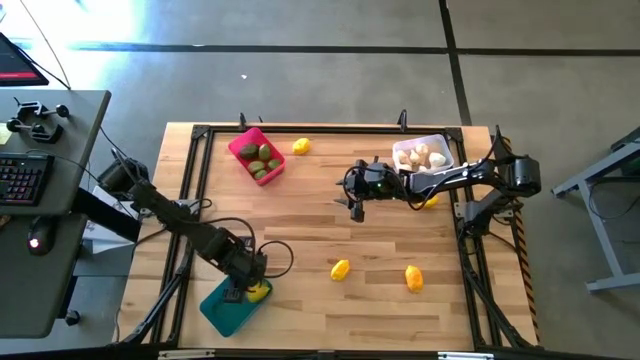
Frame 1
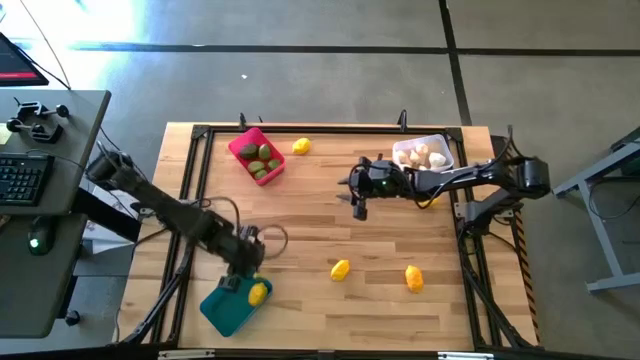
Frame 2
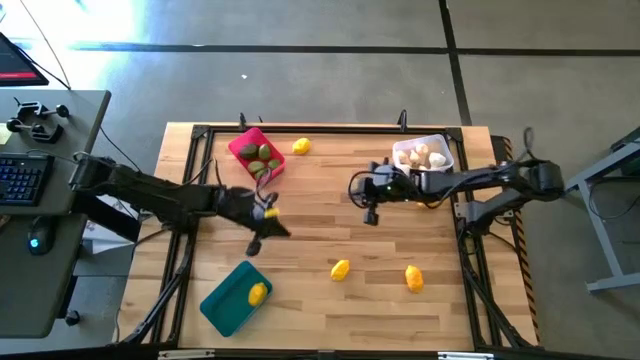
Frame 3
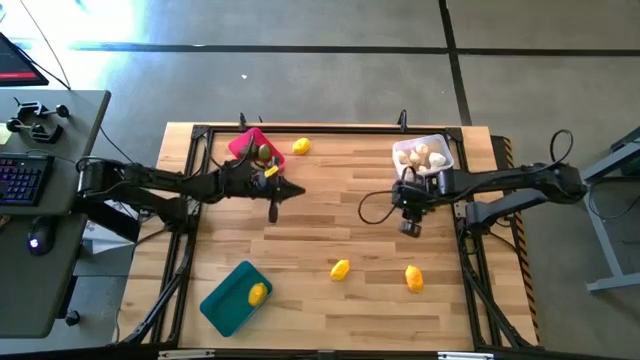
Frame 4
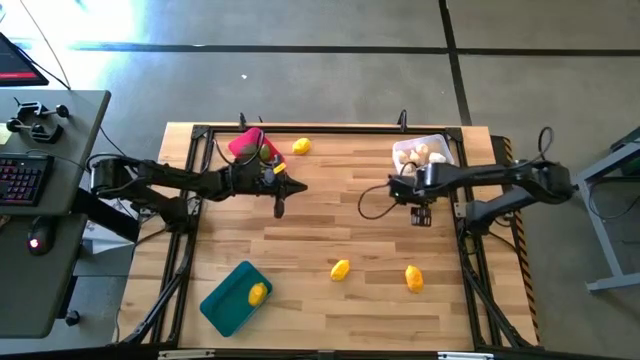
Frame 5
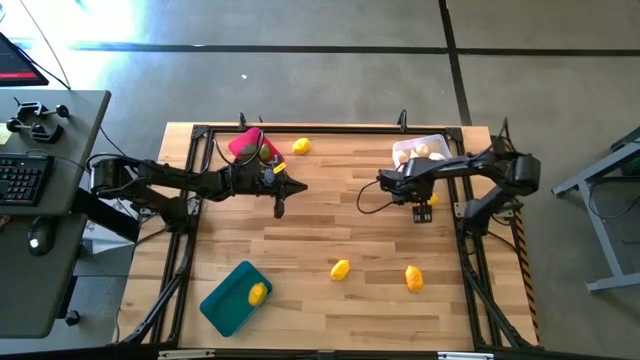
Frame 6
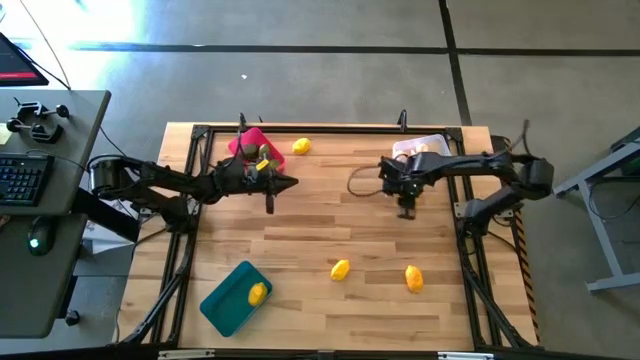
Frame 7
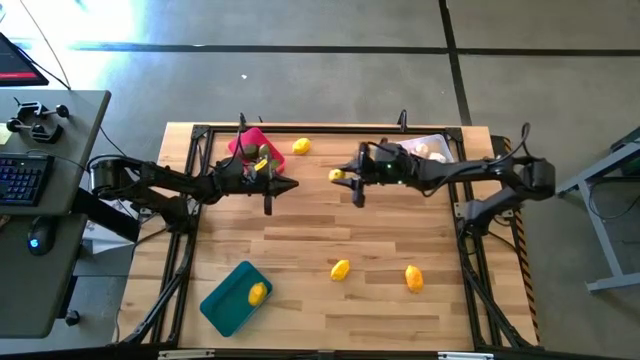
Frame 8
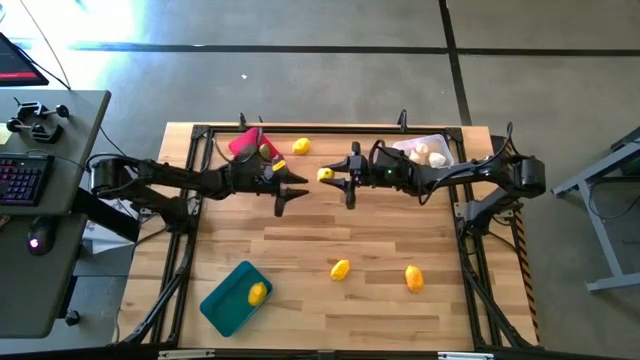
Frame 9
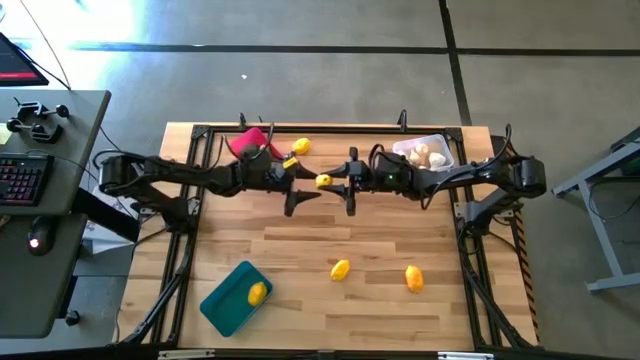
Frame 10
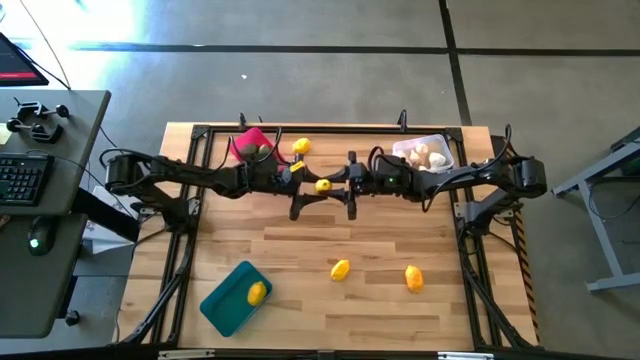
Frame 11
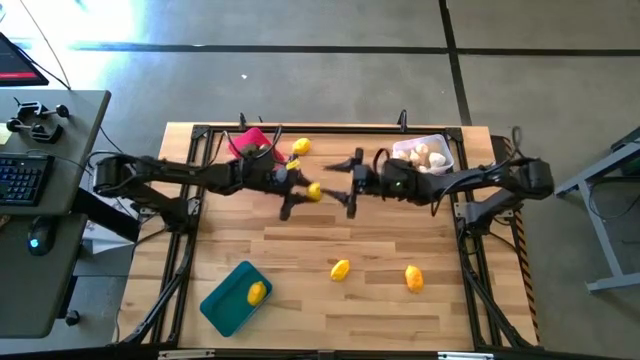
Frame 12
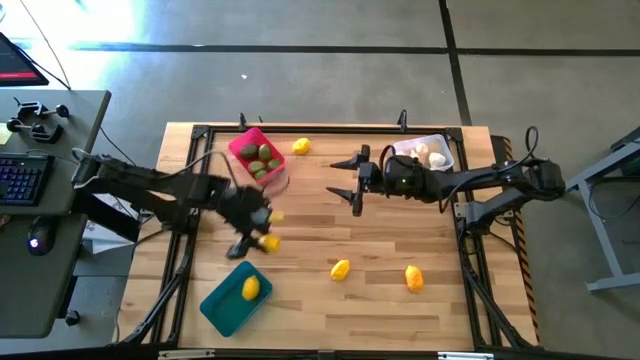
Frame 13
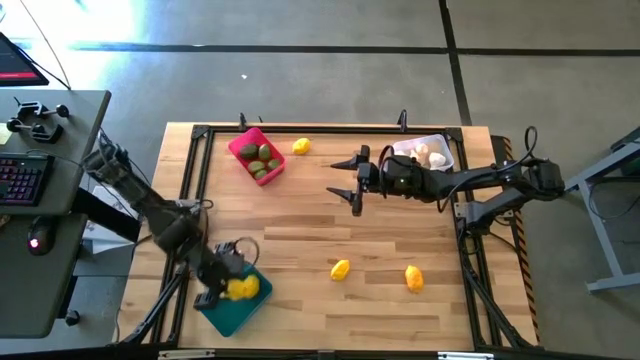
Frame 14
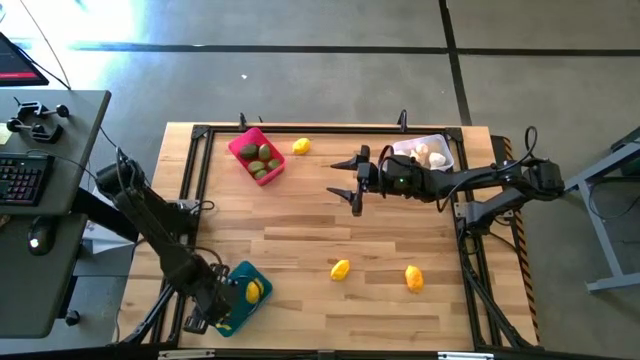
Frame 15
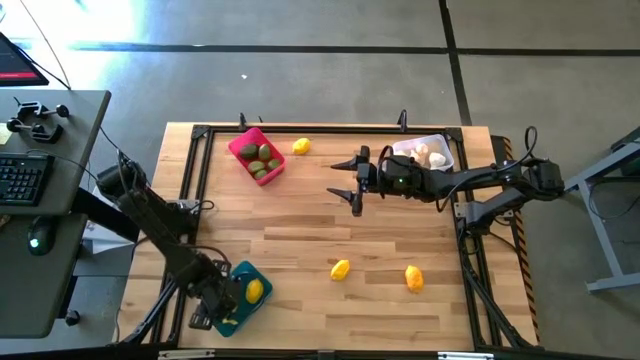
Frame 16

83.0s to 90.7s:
Task: Sort produce into baskets
Put the yellow lemon in the blue bin

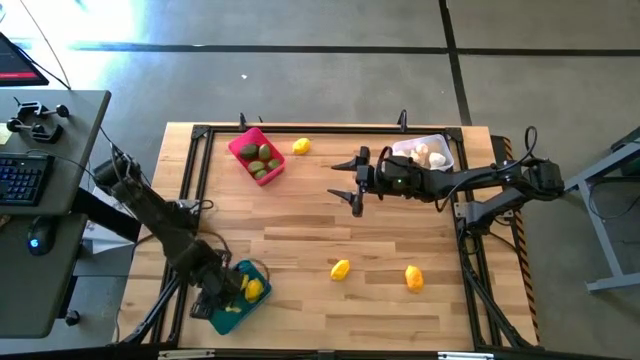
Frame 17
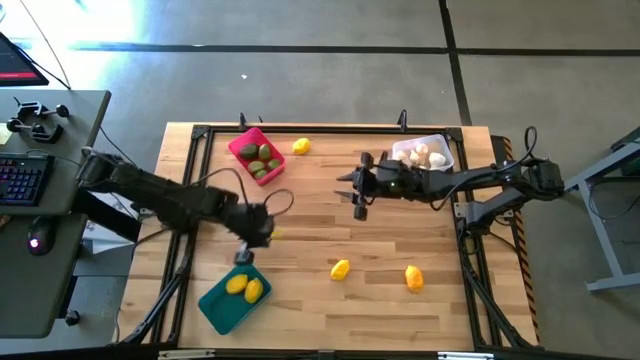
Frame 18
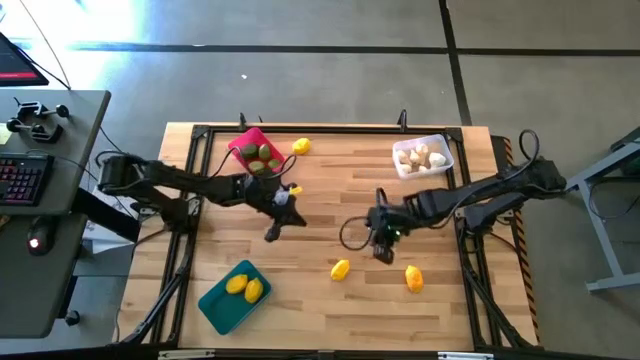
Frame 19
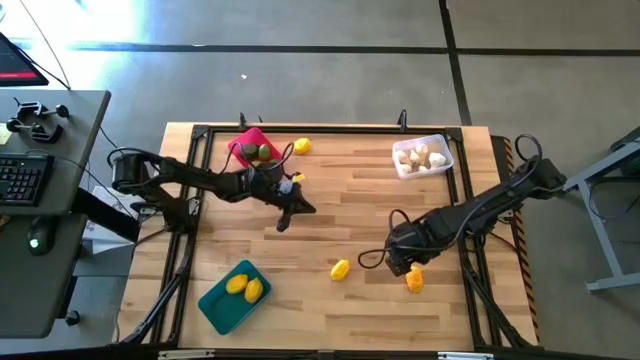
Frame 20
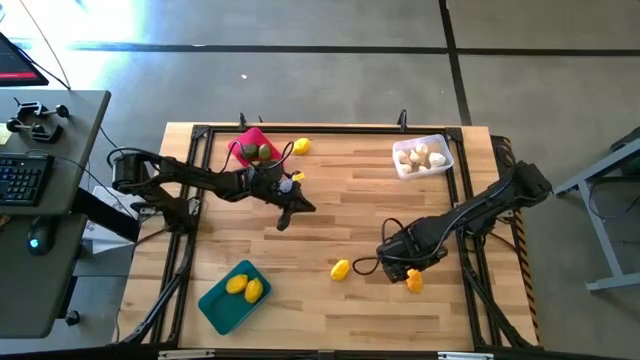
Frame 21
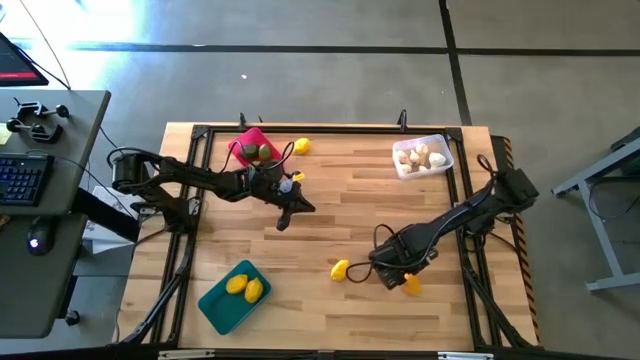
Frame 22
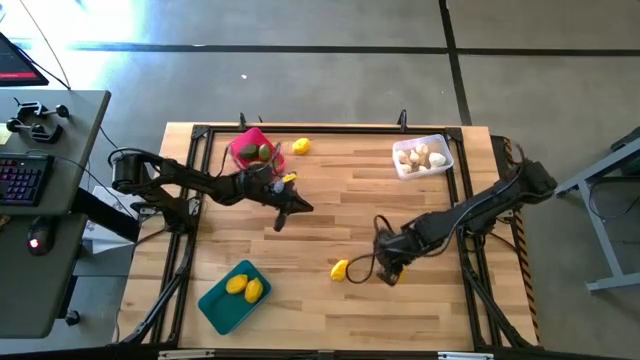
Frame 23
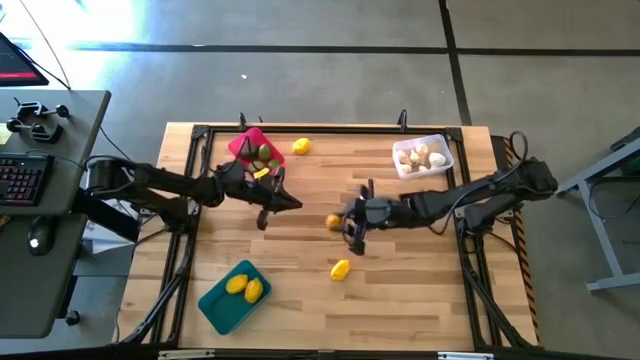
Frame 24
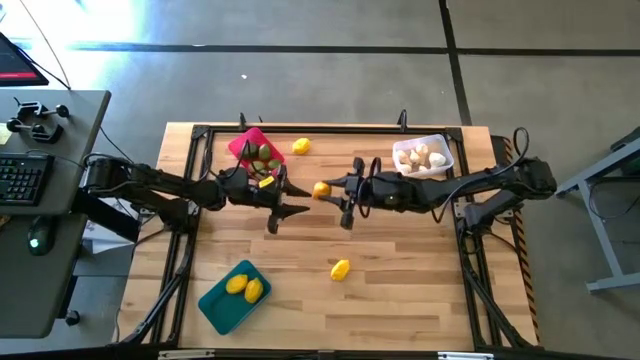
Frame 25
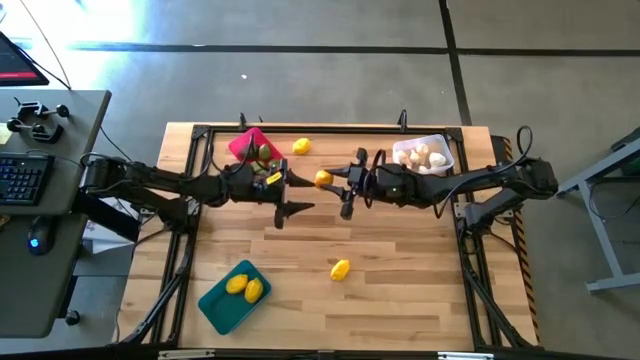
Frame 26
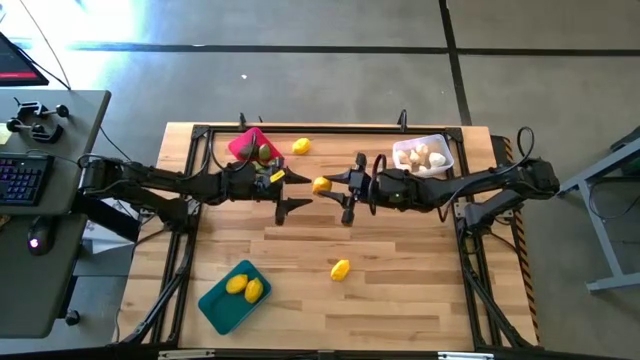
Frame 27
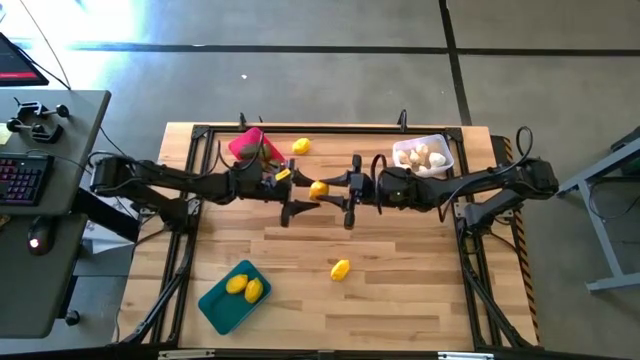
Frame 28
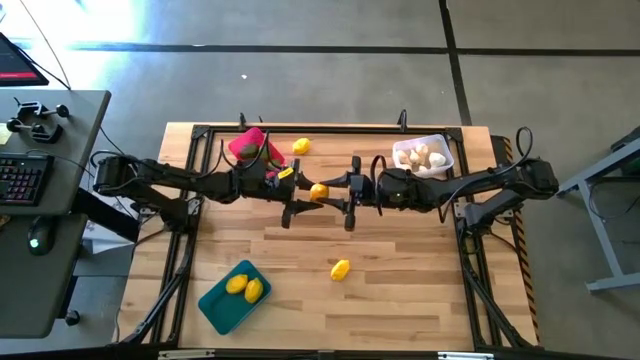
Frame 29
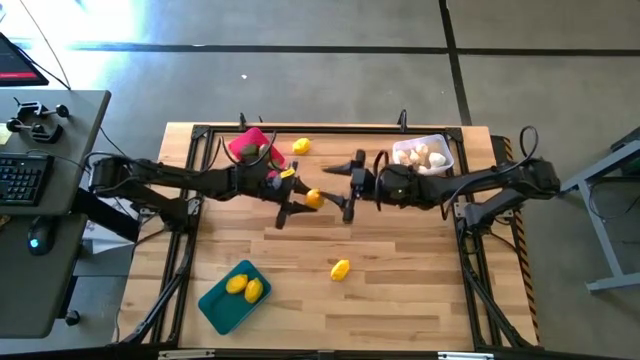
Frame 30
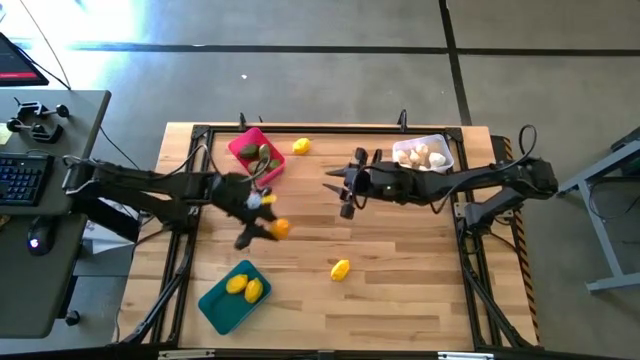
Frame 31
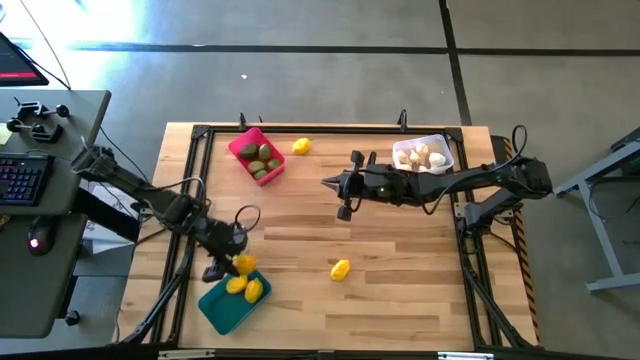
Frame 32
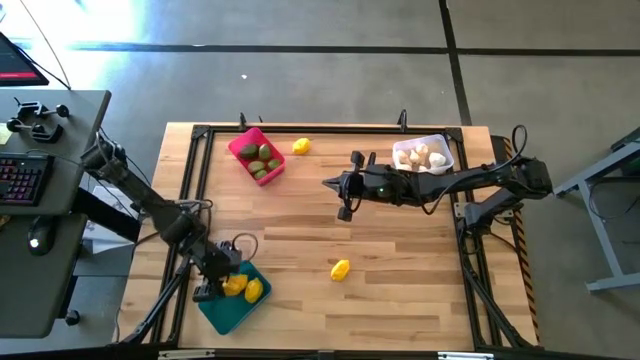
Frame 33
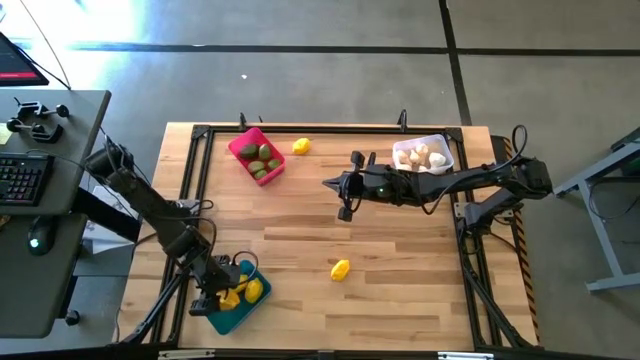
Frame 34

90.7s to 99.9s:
Put the yellow lemon in the blue bin

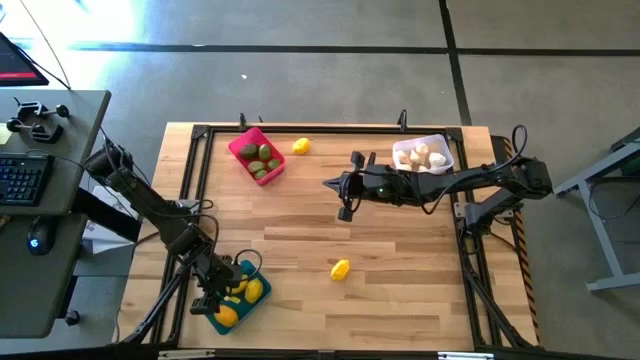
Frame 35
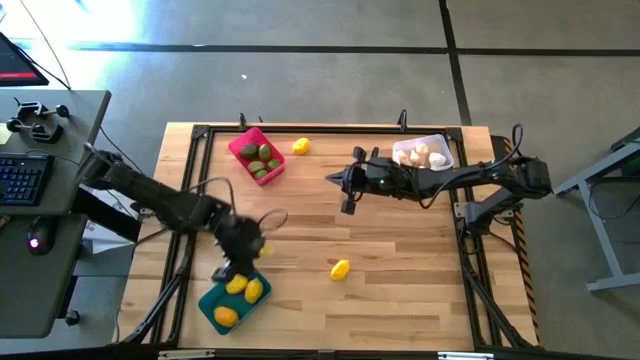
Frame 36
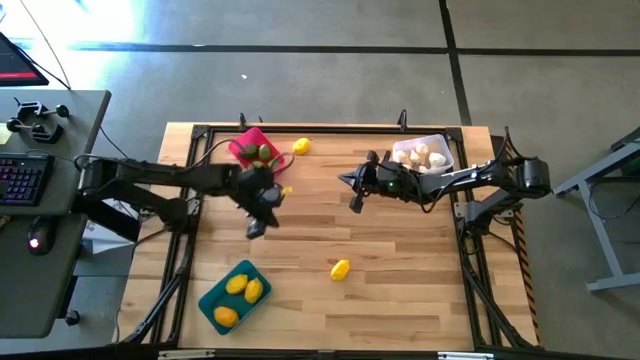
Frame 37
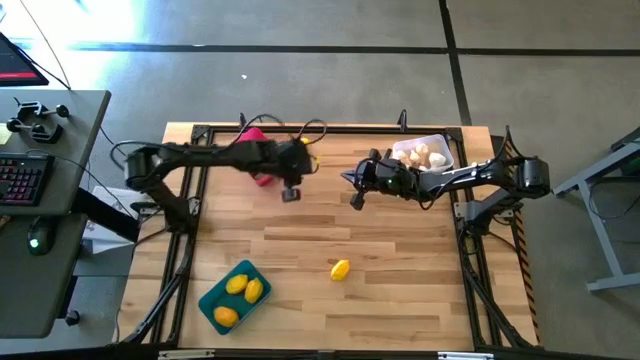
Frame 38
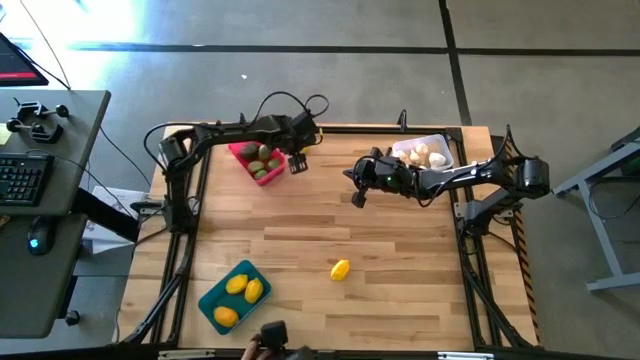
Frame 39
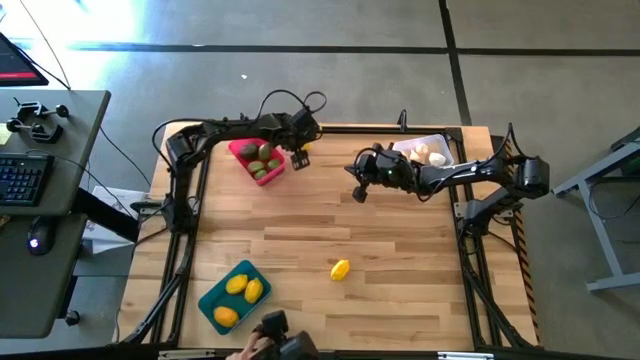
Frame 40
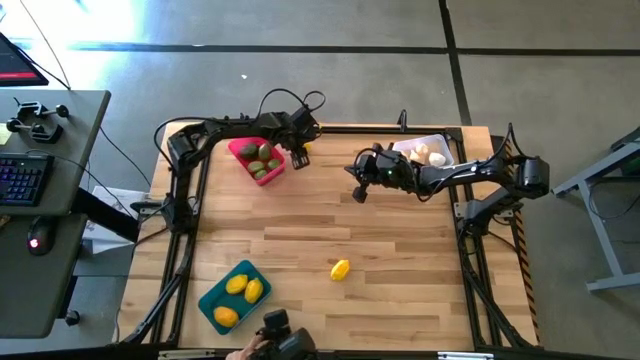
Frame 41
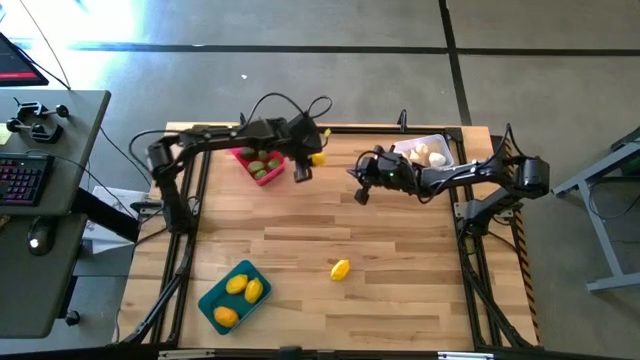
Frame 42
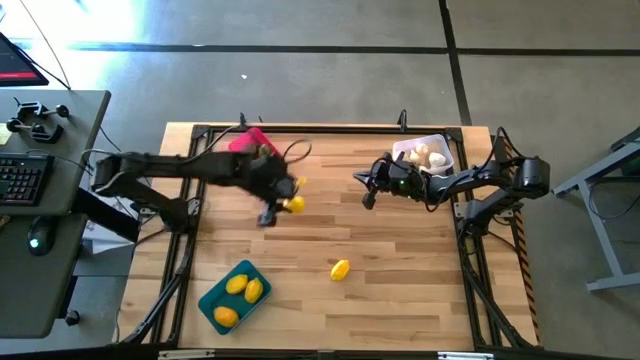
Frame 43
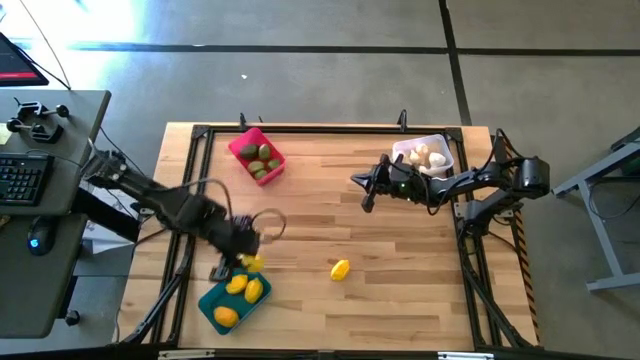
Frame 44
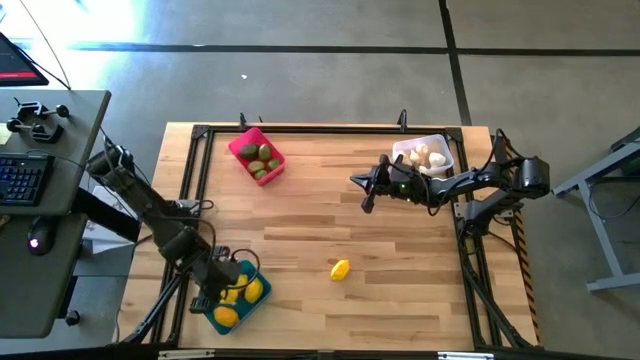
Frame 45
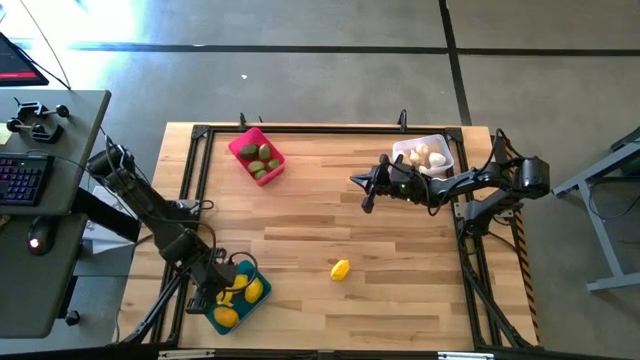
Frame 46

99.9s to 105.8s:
Put the yellow lemon in the blue bin
